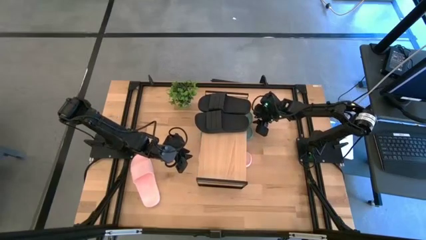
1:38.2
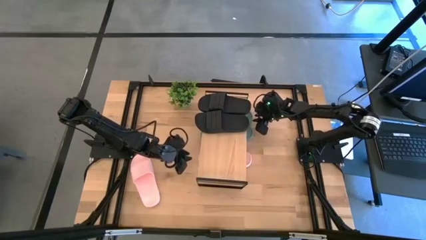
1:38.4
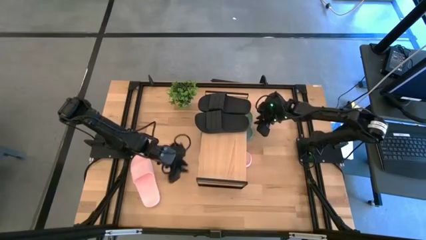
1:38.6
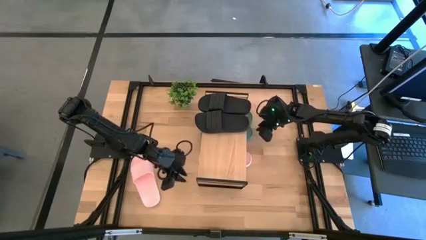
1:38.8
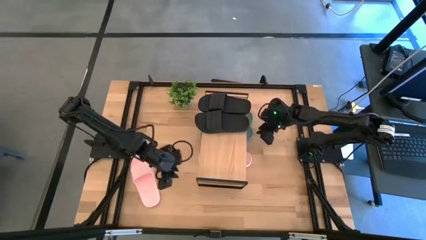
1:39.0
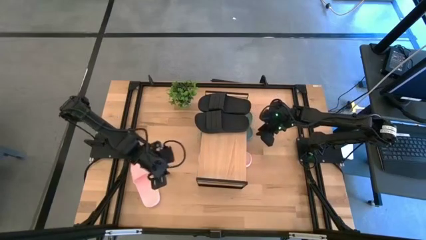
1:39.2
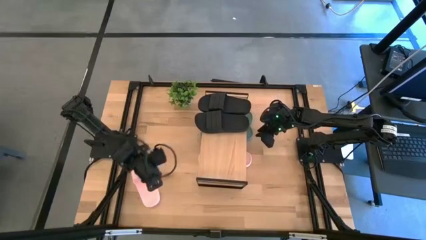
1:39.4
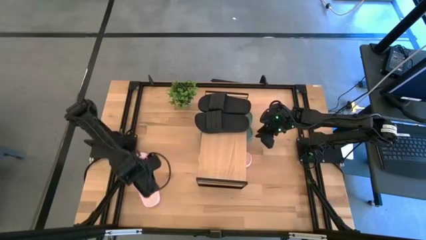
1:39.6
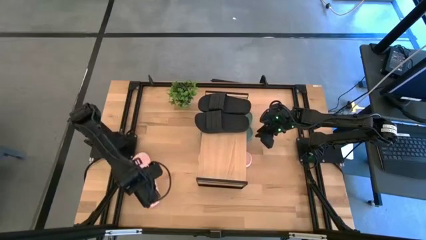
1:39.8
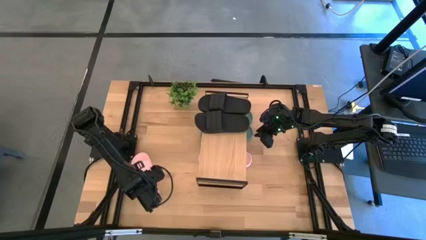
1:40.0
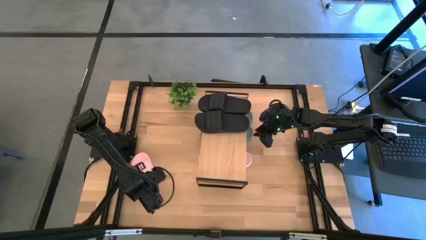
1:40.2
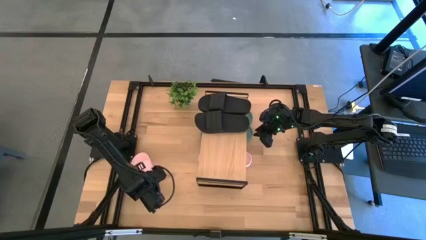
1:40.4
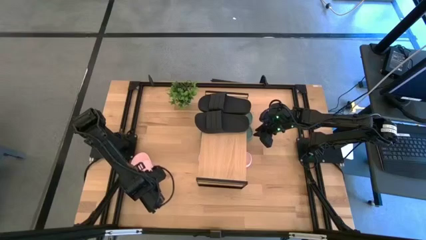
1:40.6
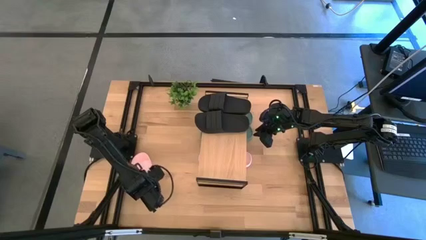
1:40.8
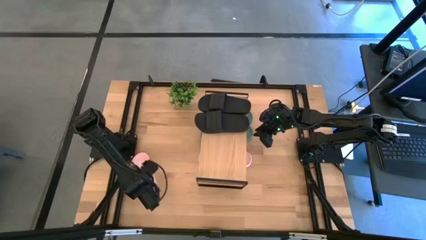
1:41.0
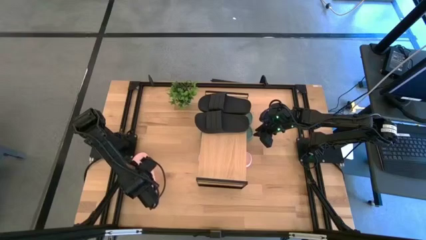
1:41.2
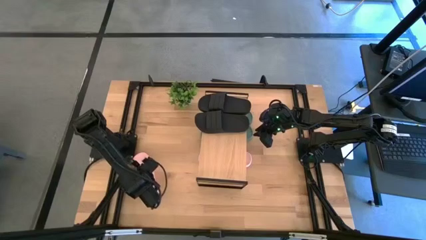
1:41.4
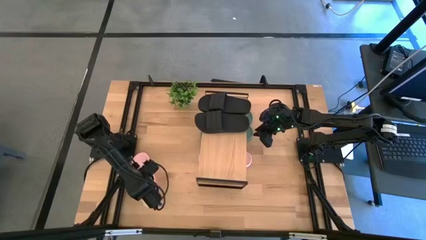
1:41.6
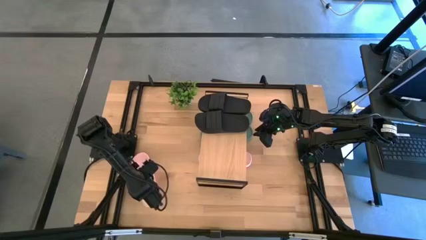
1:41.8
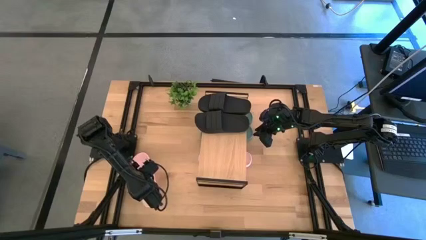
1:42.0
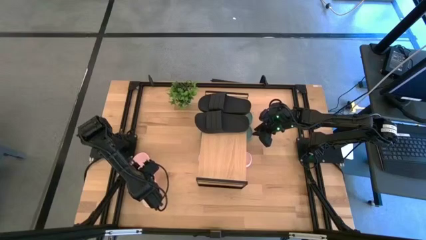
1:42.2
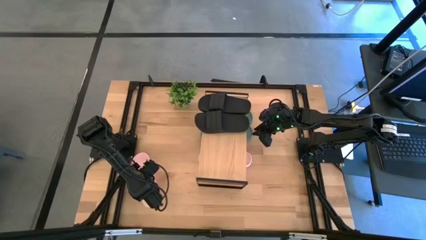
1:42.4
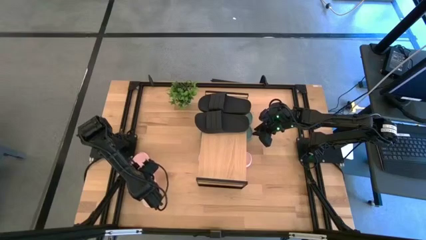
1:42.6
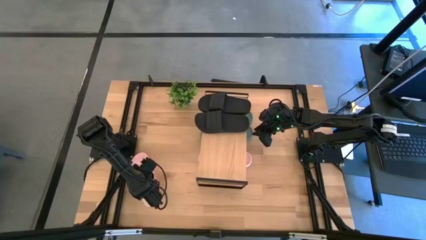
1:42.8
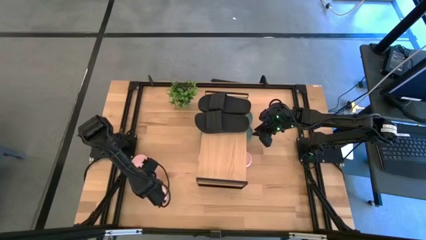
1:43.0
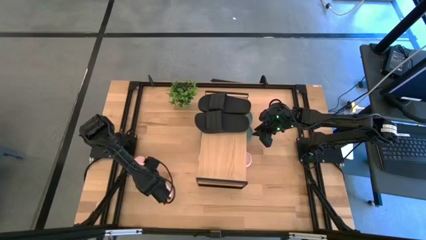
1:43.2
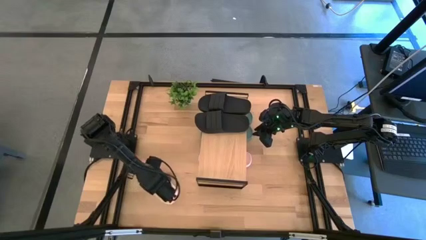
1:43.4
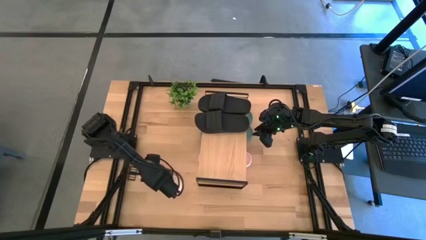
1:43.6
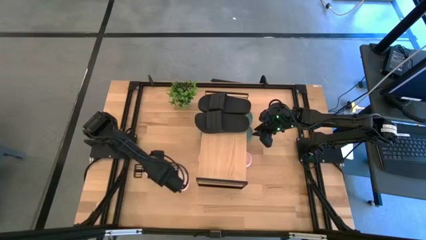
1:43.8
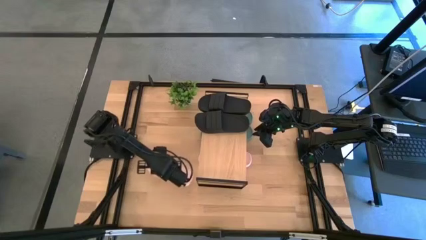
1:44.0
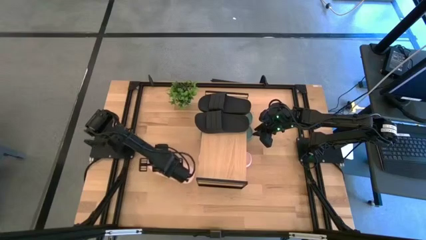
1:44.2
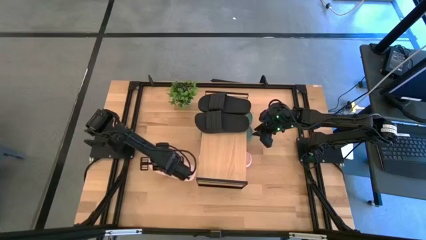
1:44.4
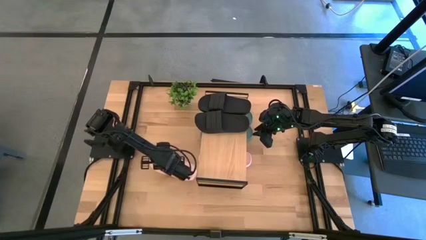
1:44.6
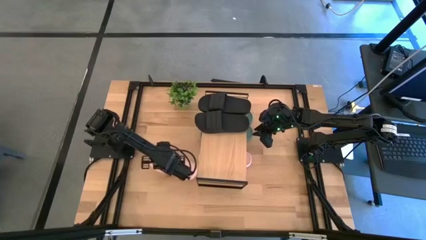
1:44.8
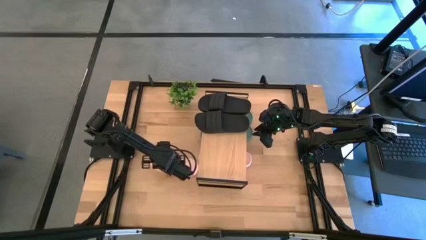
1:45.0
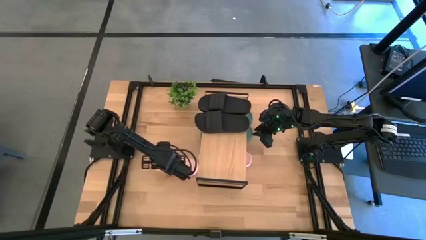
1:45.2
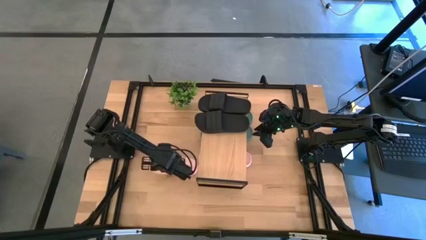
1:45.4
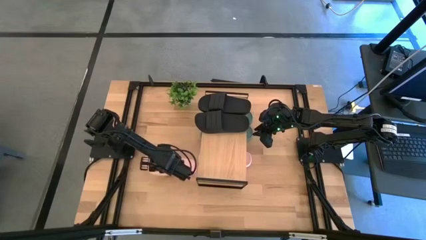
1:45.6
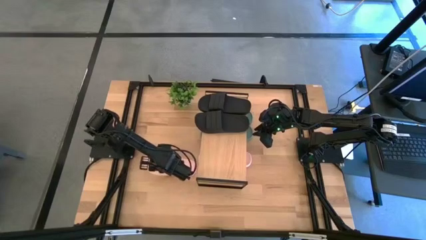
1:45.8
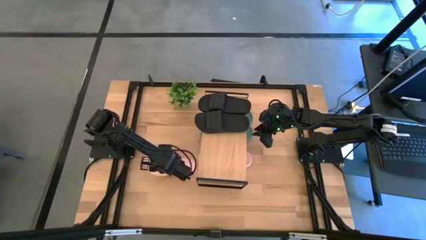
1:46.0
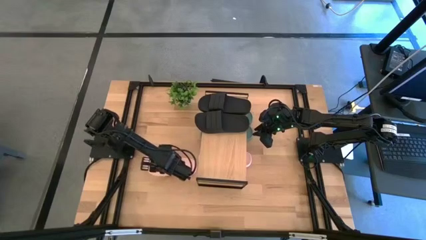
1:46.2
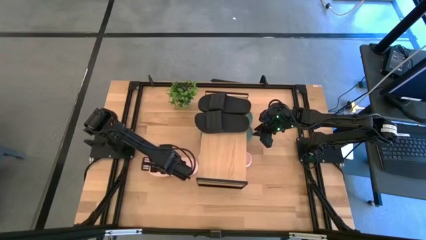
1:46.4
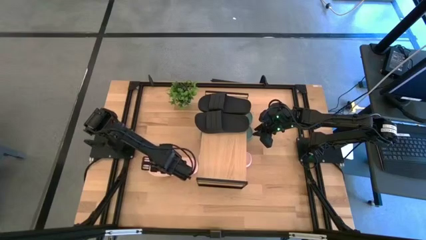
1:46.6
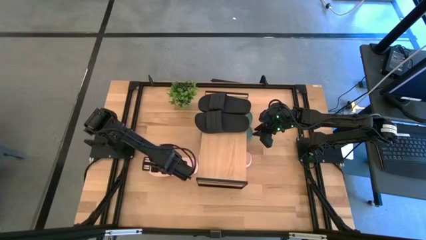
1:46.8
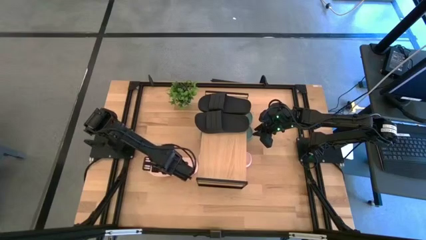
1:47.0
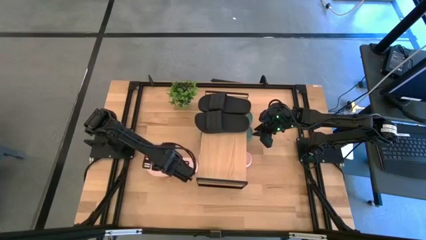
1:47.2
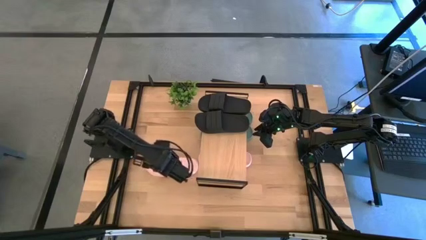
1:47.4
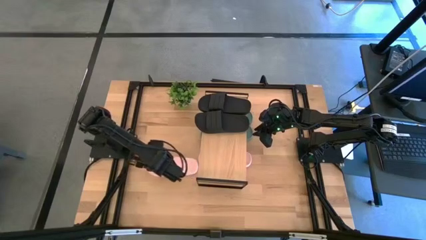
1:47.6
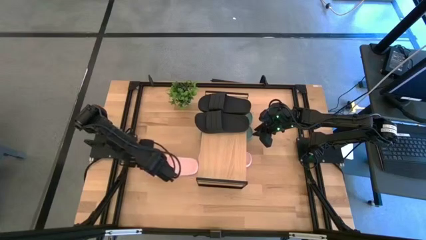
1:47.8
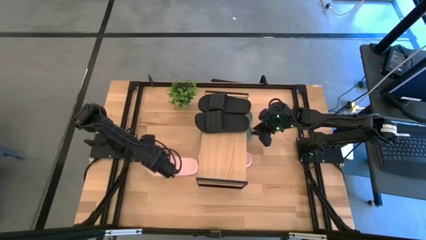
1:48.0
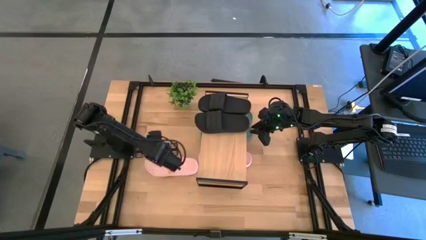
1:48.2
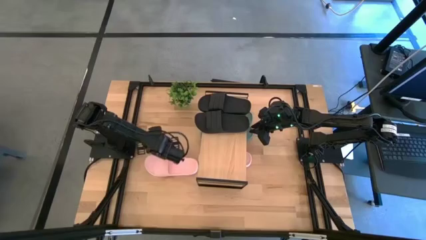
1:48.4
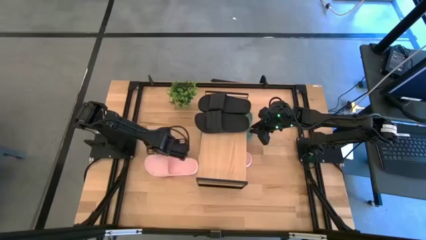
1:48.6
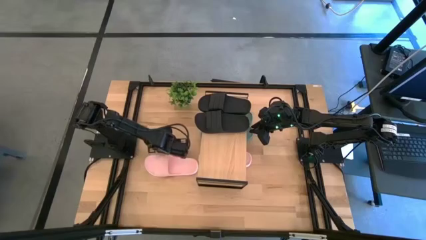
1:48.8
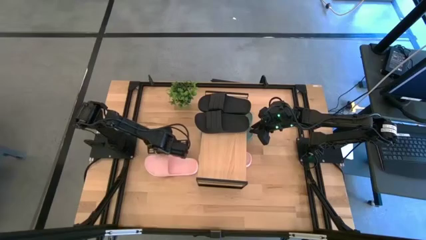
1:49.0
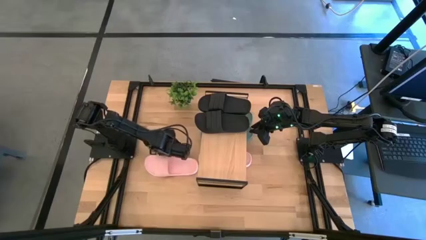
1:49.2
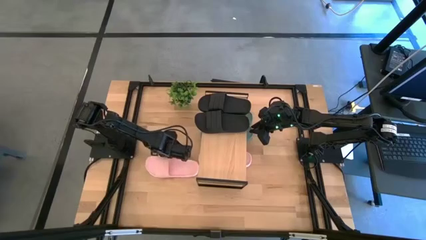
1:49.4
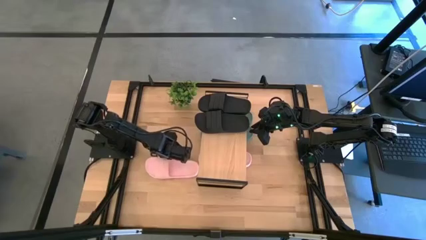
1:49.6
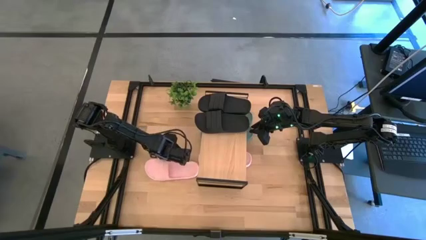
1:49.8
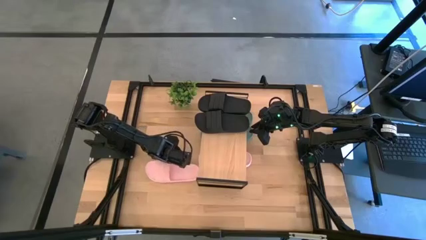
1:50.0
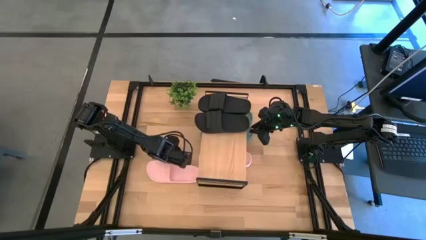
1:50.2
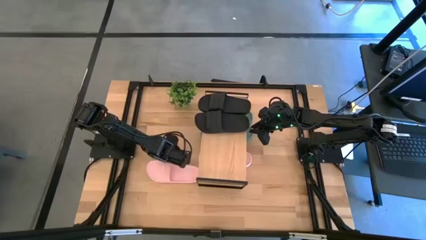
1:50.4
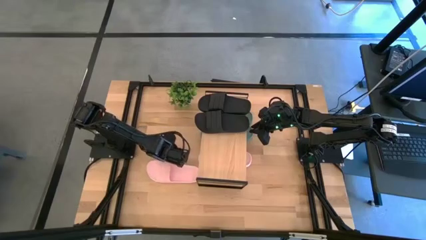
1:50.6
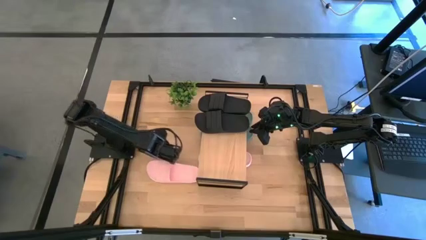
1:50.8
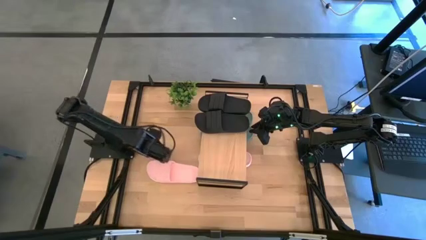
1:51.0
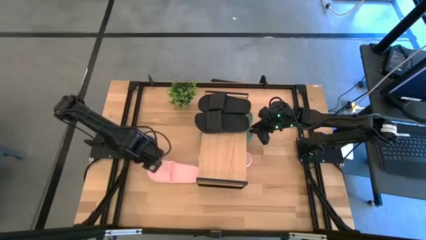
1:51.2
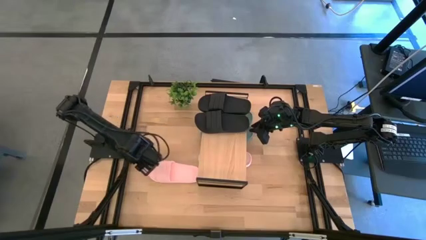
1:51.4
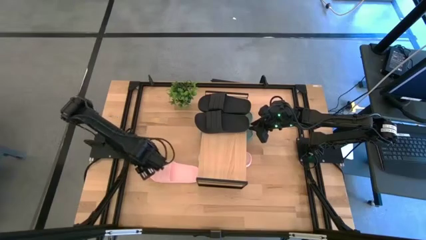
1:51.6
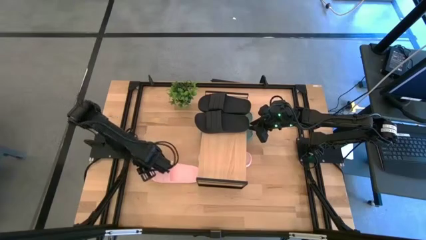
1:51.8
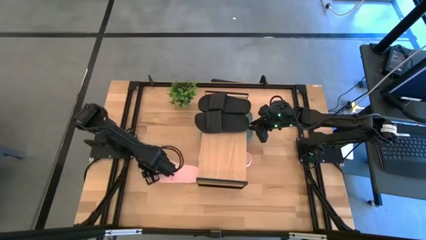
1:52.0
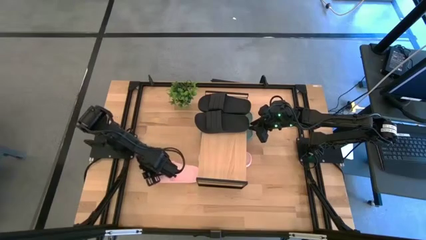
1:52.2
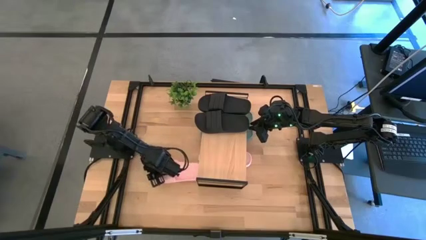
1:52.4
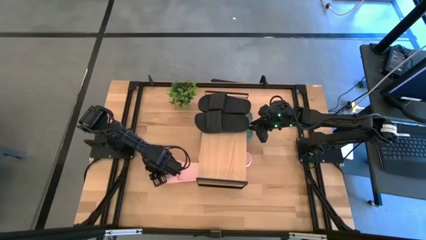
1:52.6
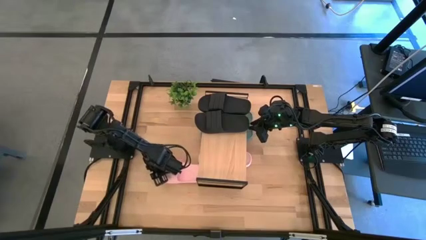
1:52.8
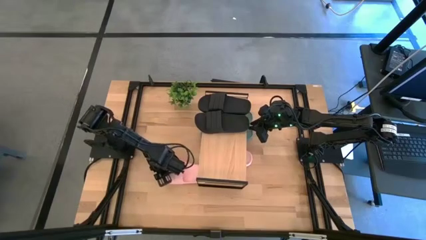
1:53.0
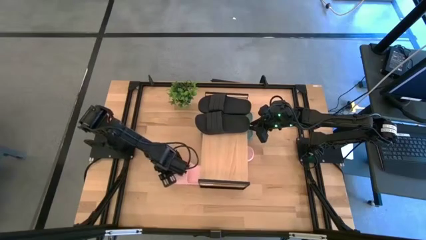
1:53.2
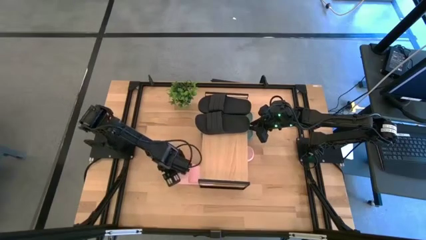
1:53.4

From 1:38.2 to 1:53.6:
Task: Pick and place slides into the shelf
Put the pink slide under the shelf
